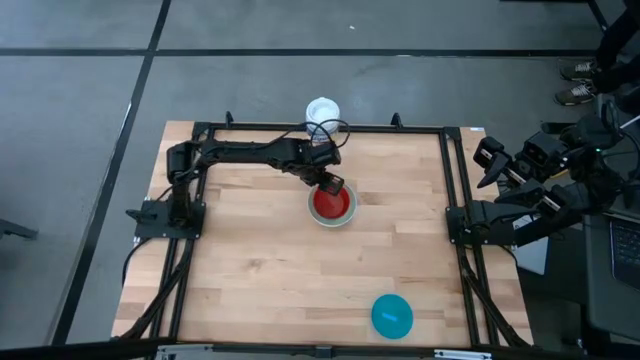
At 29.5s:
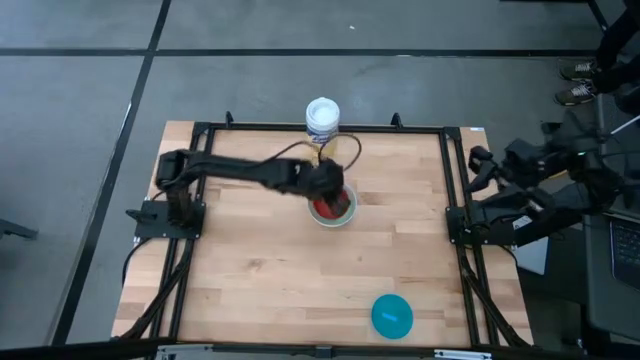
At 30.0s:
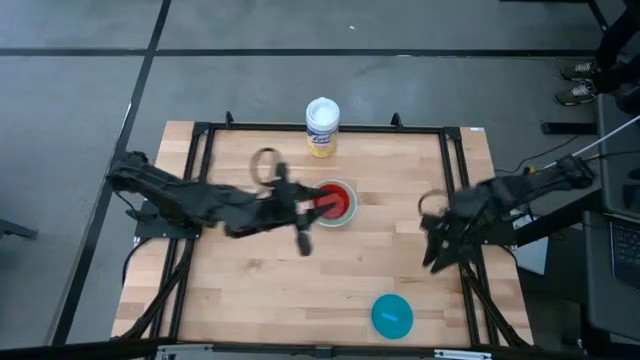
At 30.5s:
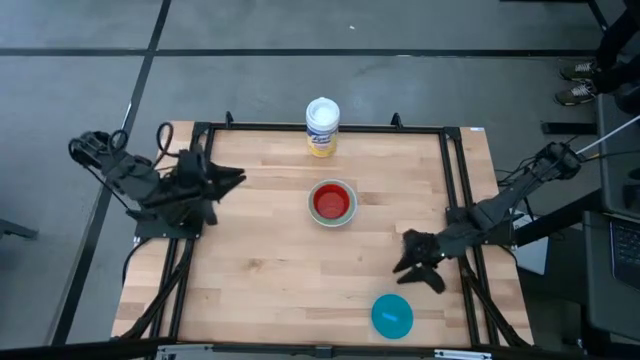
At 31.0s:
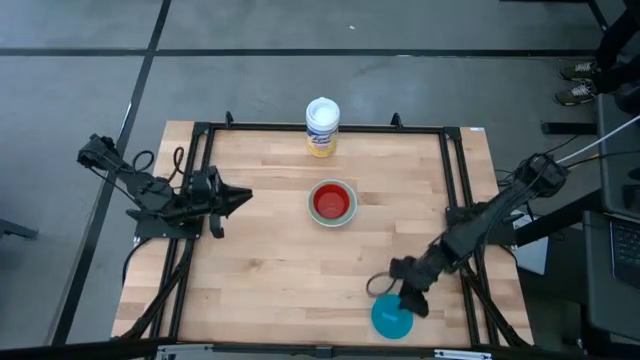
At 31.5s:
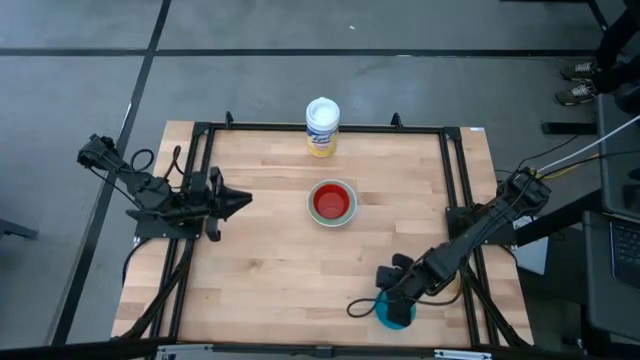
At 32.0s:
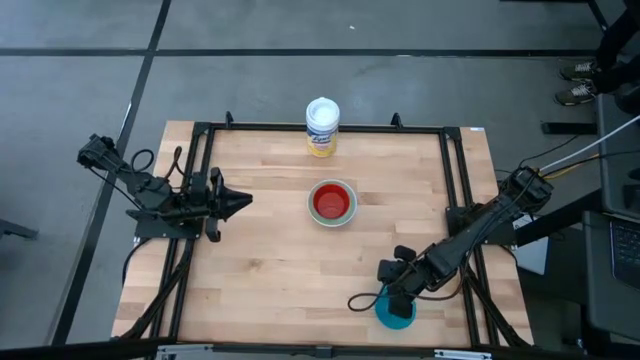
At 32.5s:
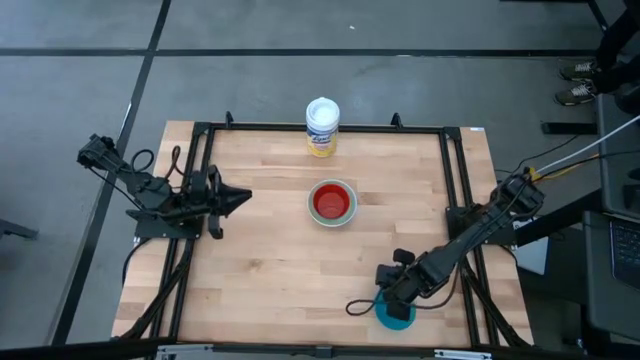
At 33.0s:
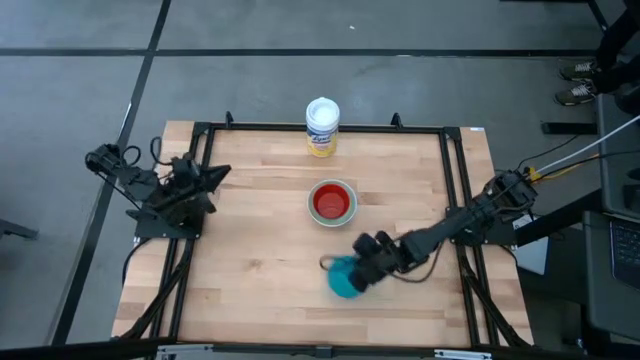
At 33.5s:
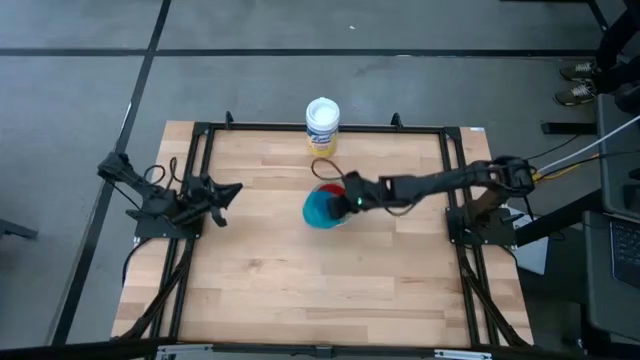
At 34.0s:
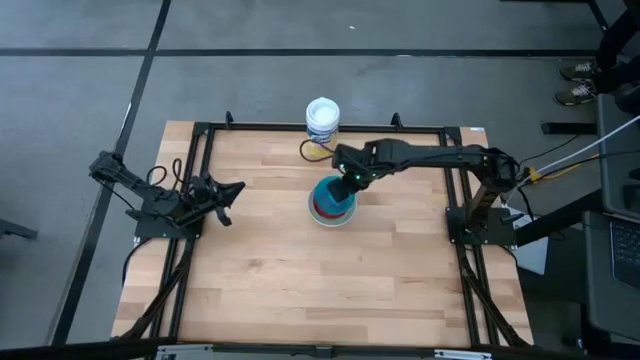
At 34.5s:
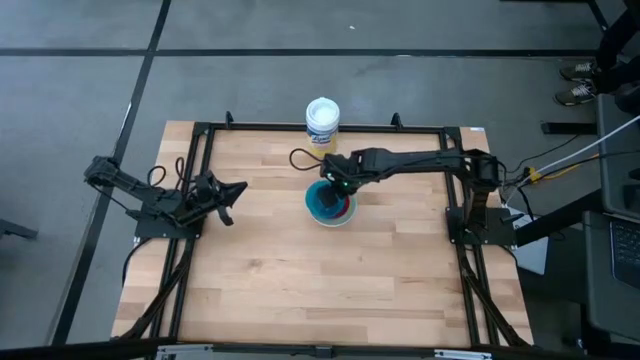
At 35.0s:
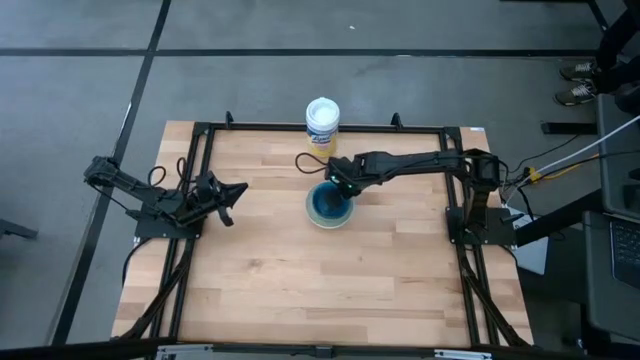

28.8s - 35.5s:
Stack the light blue bowl on the red bowl

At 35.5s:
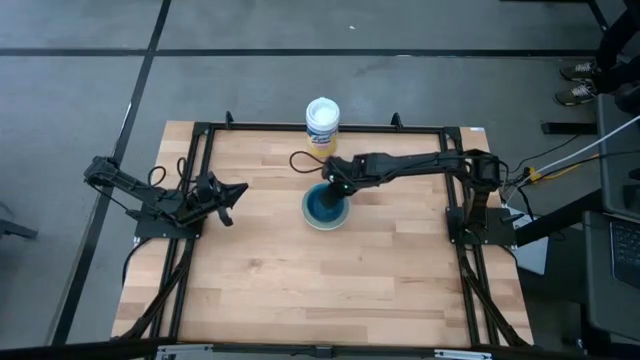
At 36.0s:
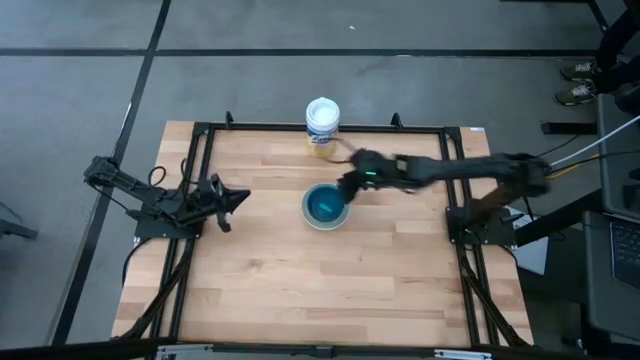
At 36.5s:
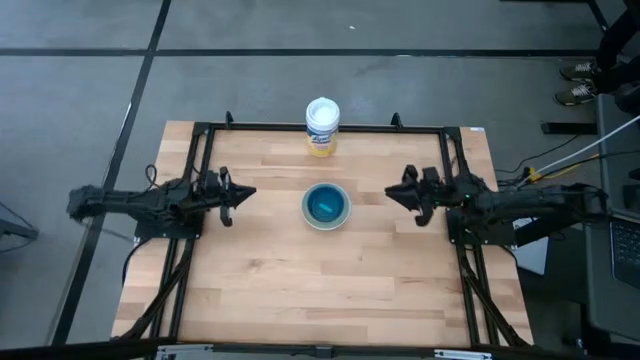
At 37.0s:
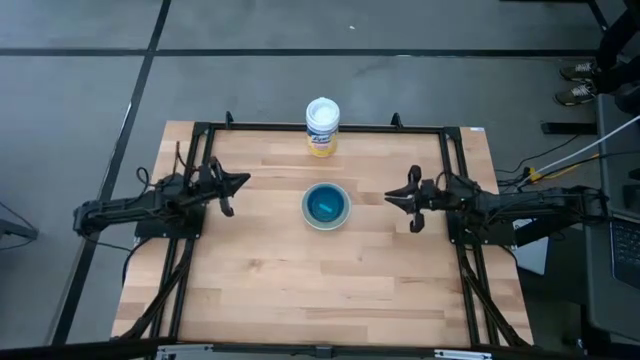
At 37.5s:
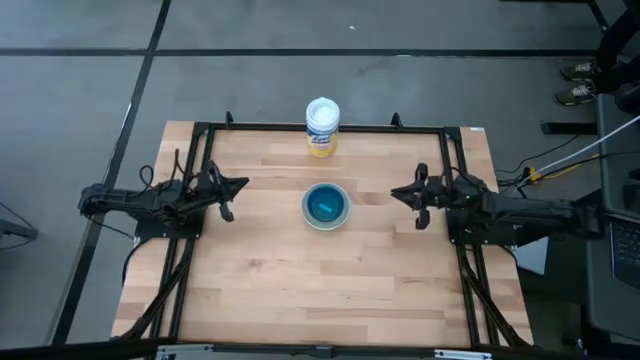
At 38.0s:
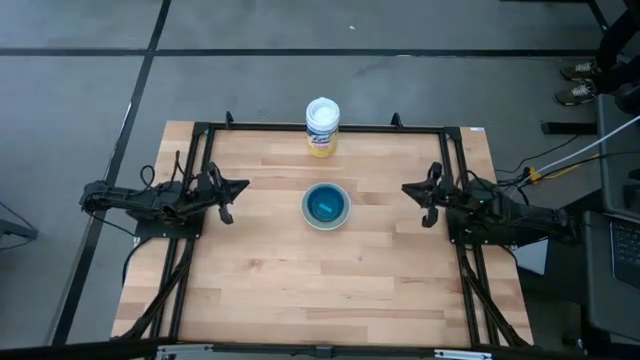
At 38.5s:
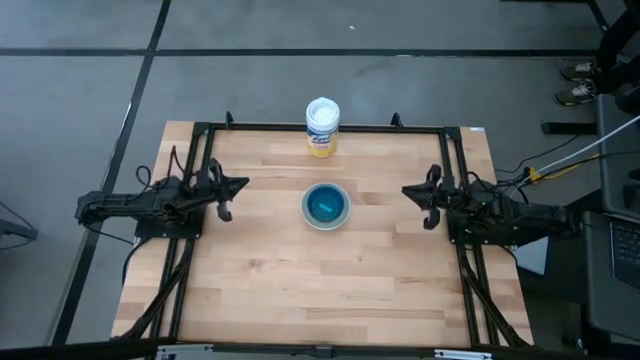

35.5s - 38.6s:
Return to Home Position

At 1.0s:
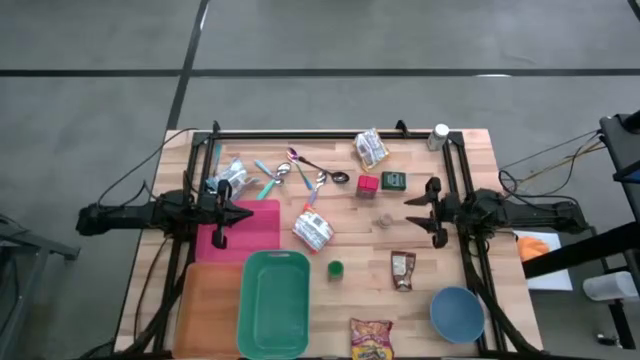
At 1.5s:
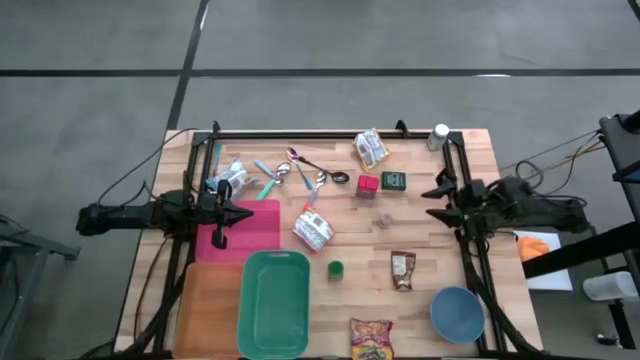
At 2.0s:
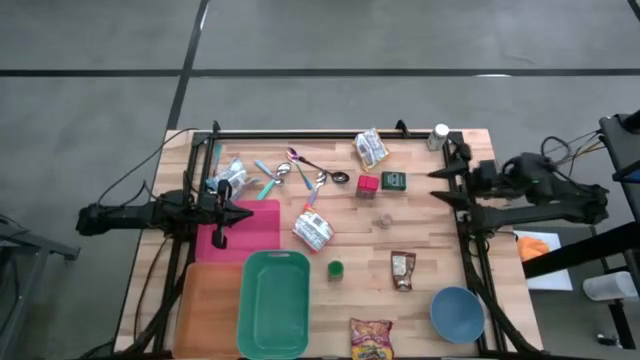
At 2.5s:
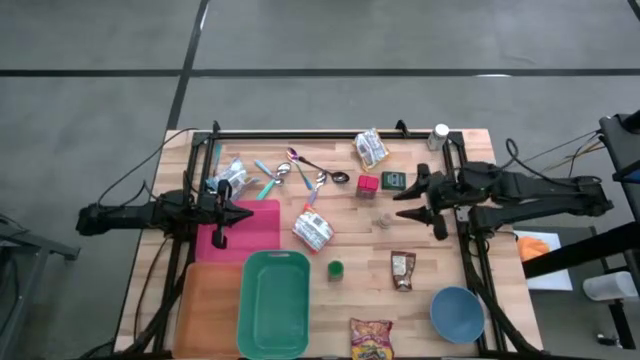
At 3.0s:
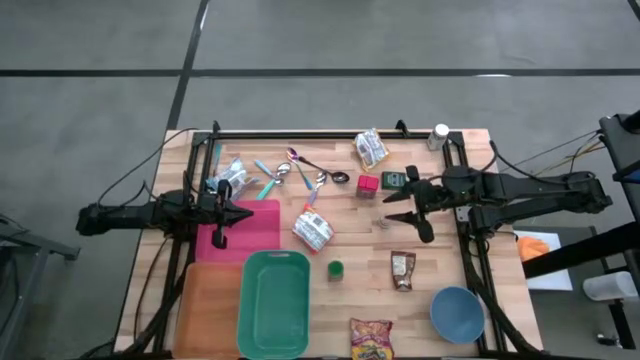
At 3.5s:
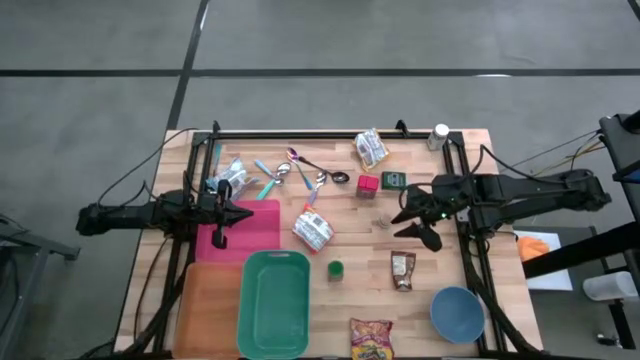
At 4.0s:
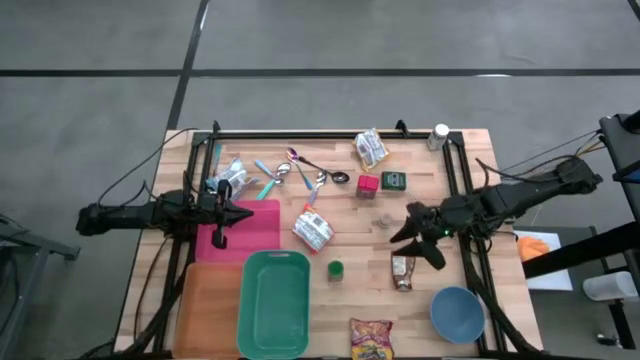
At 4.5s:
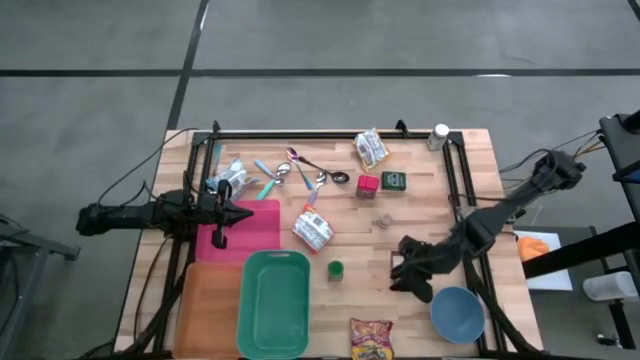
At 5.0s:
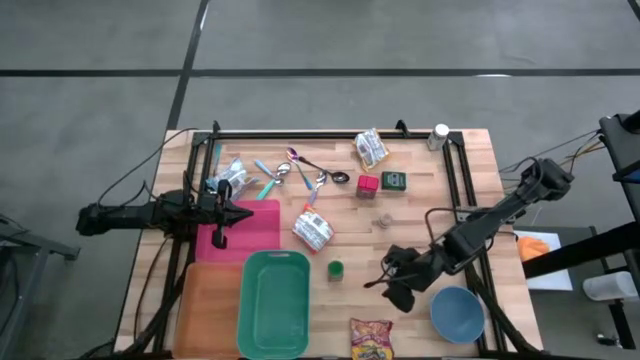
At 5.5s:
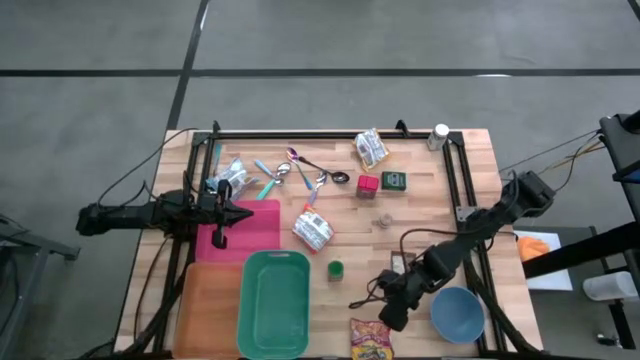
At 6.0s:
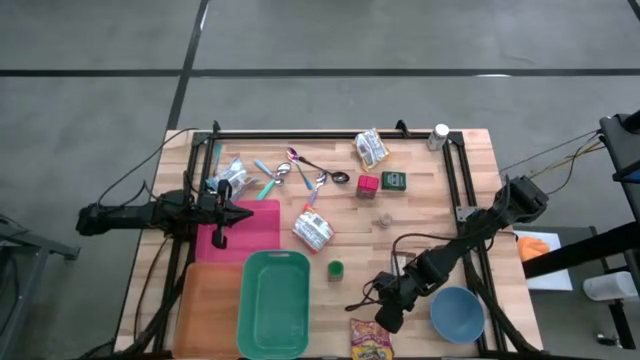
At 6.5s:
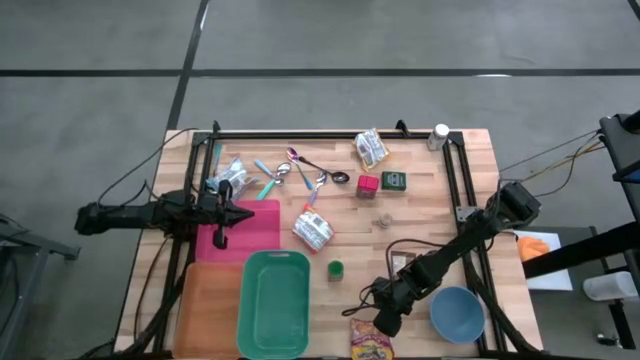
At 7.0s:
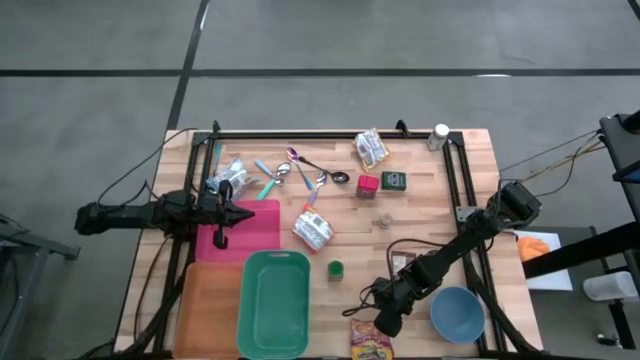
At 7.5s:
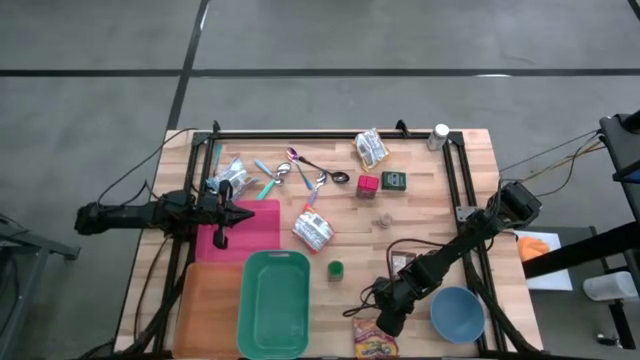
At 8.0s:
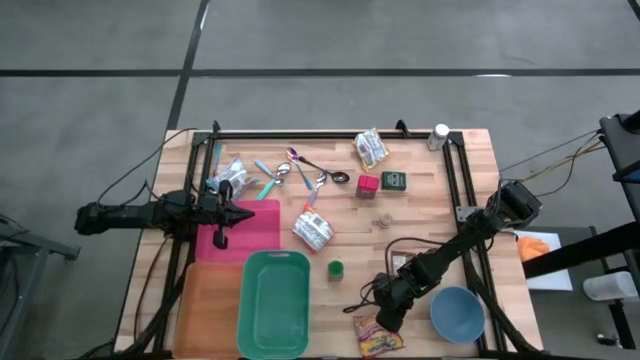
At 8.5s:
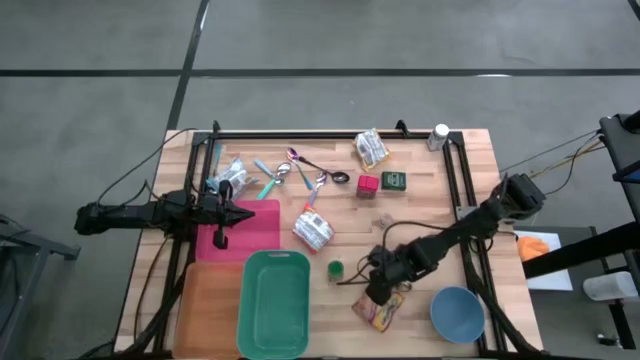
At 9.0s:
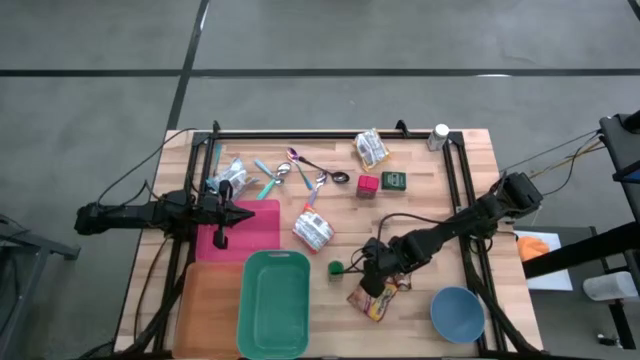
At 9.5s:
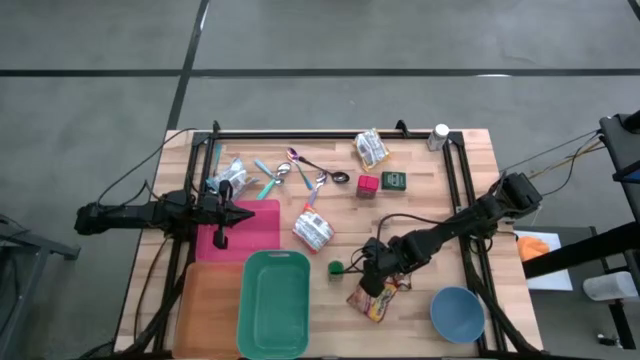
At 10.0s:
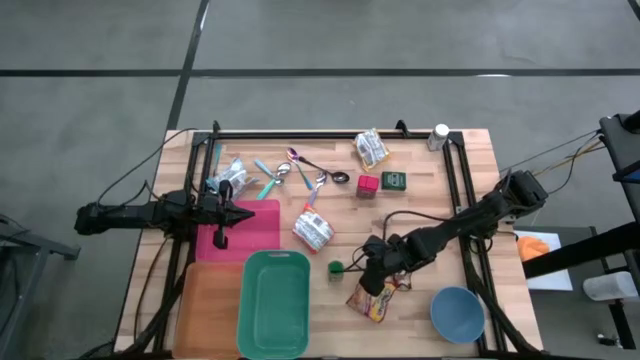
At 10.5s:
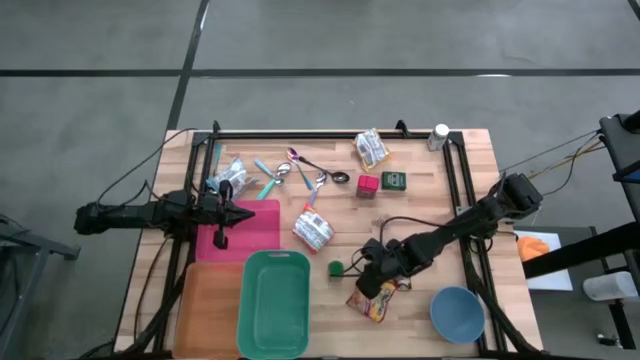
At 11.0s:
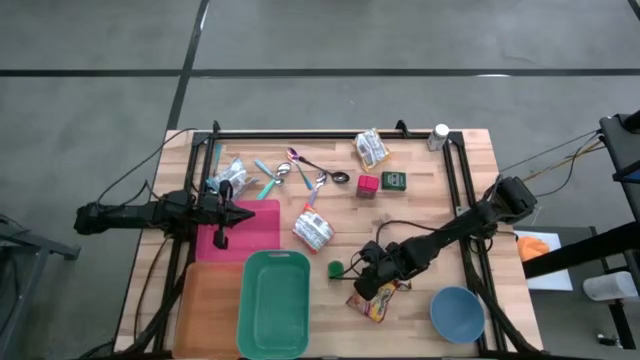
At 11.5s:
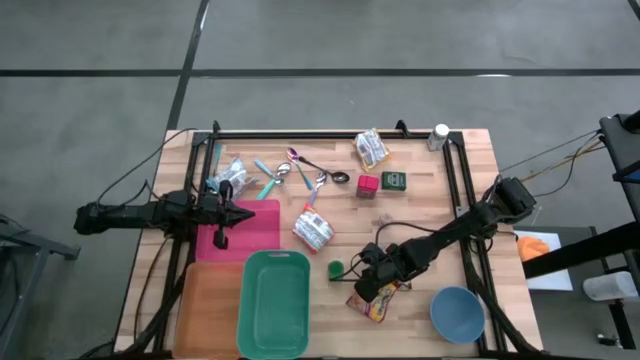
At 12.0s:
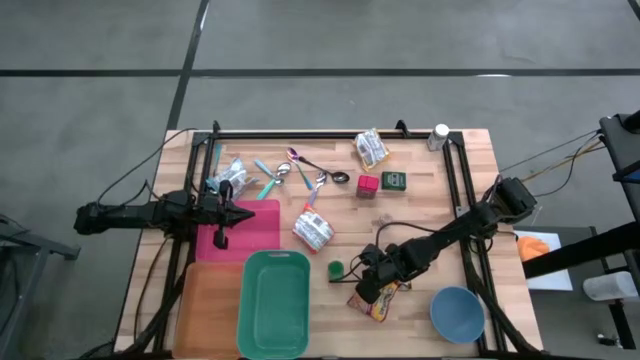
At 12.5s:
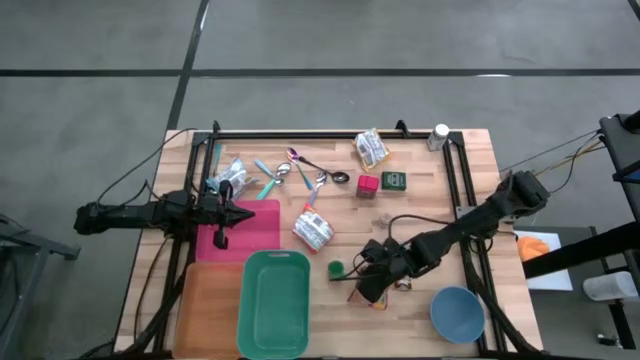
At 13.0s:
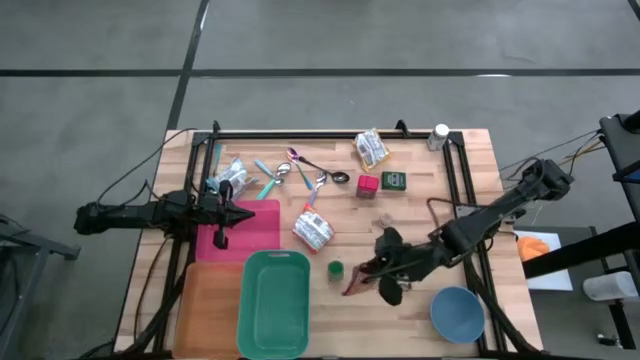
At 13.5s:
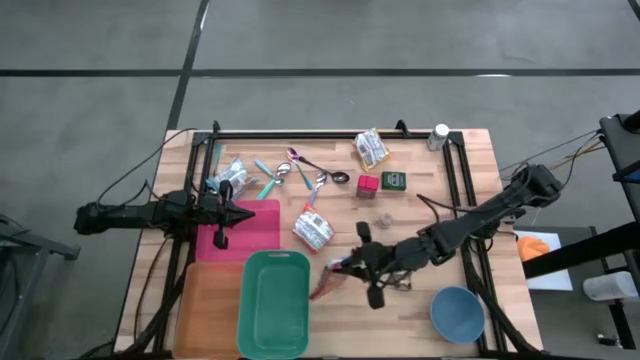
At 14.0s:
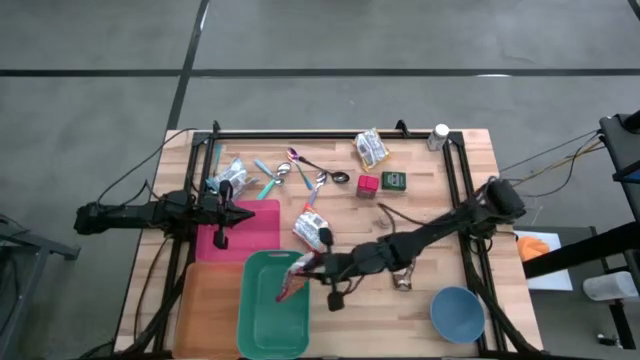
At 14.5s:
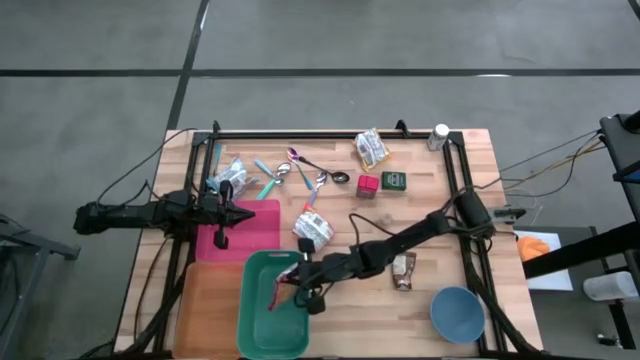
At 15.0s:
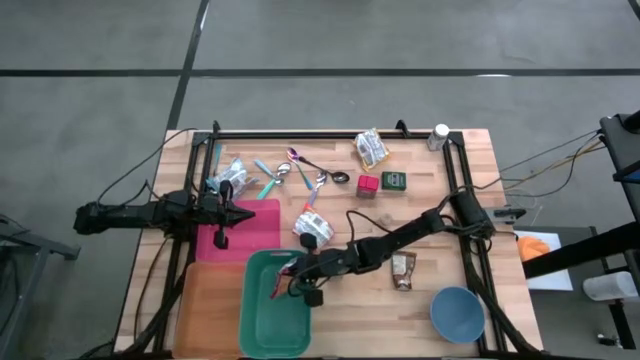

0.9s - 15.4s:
Put the red noodle pack into the green bin
